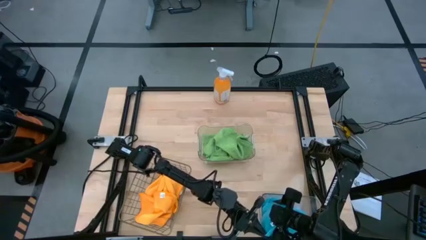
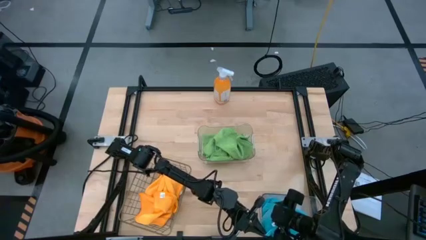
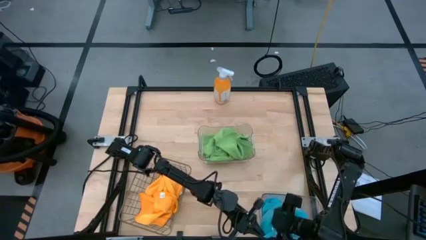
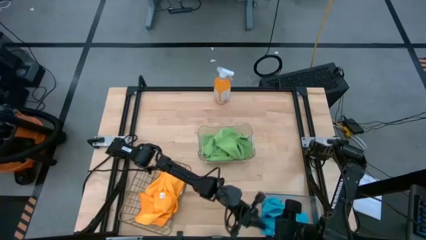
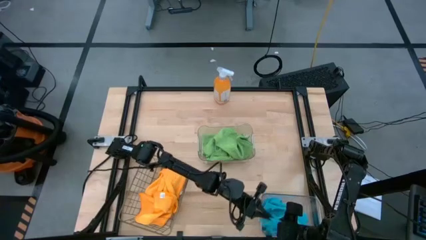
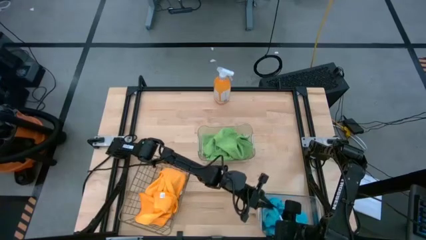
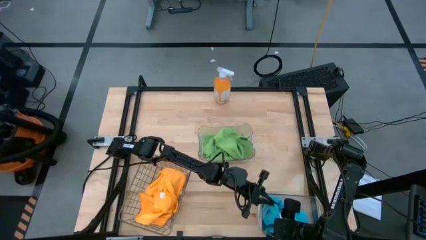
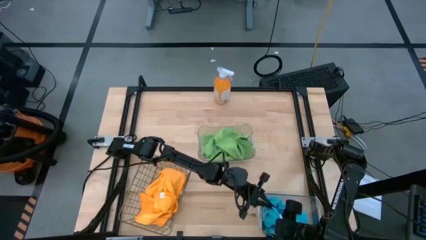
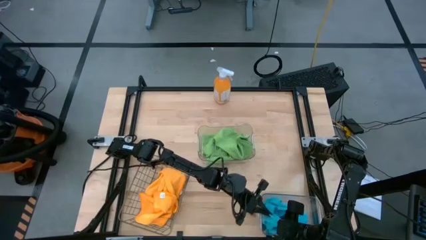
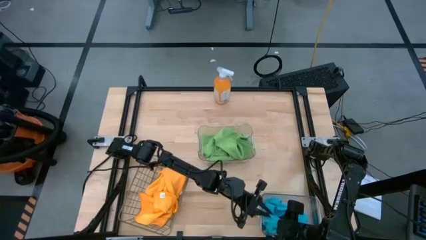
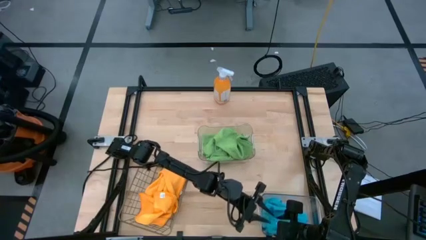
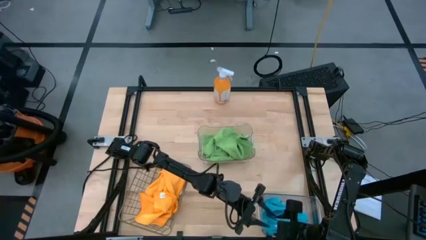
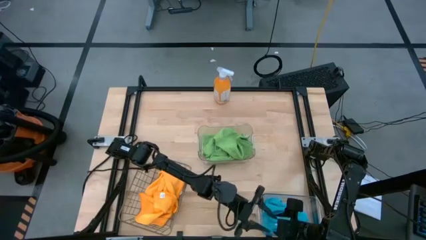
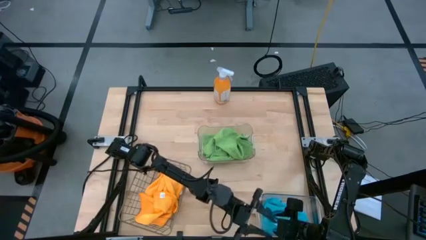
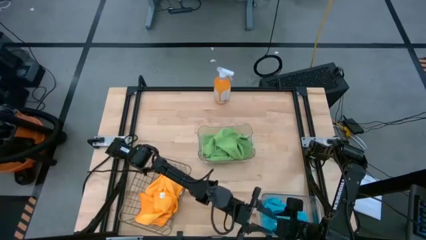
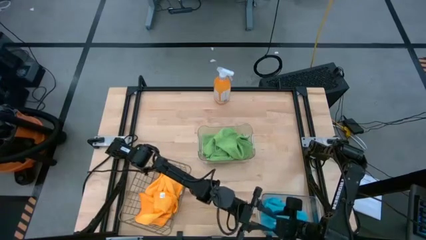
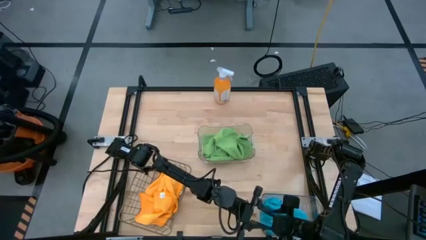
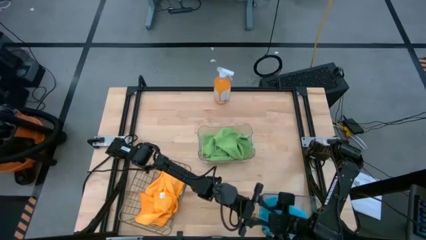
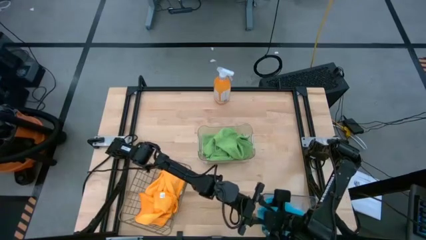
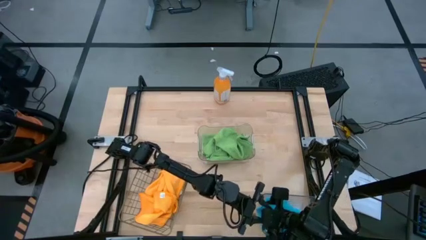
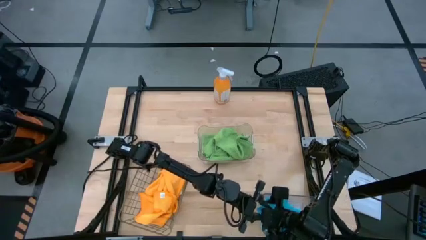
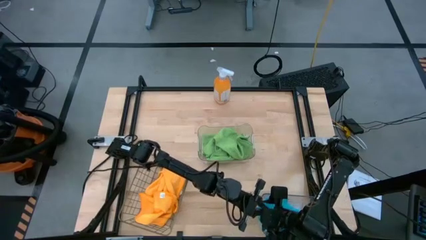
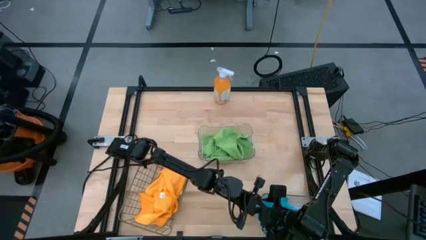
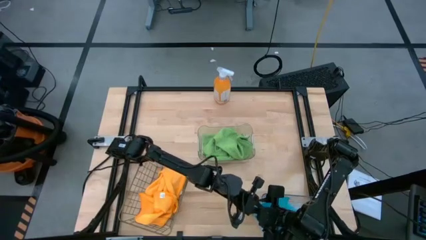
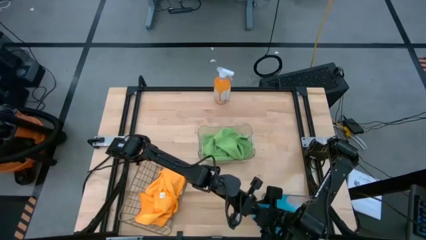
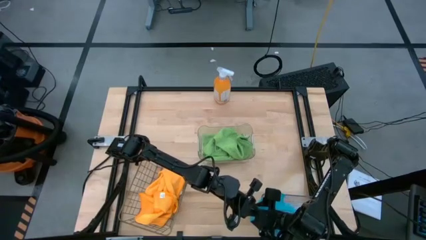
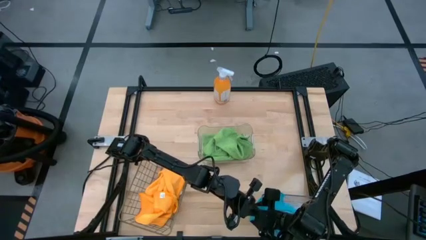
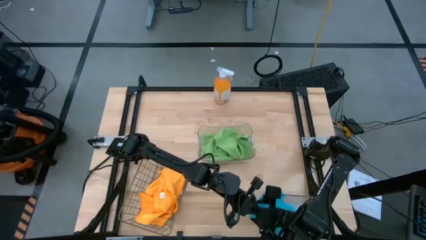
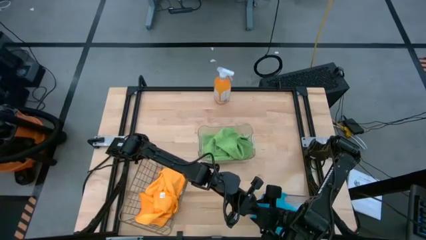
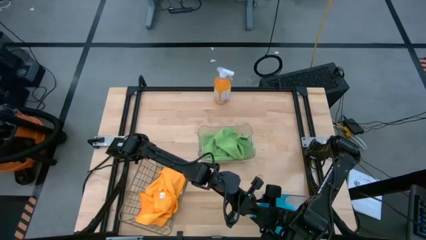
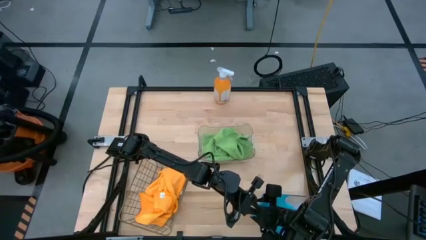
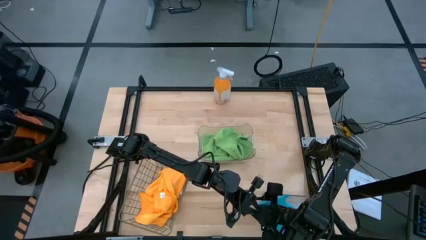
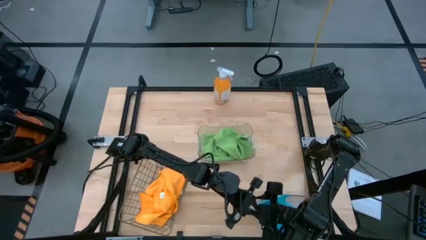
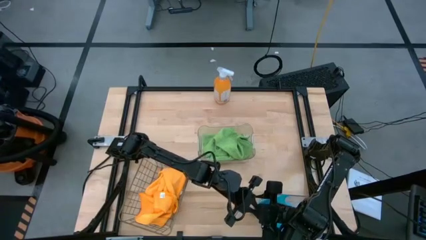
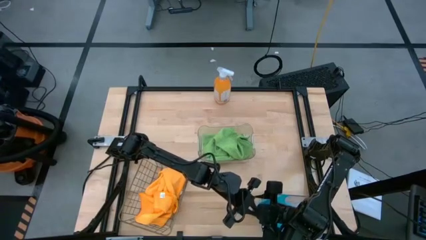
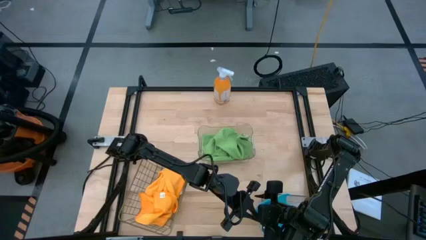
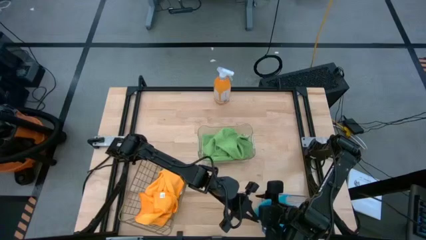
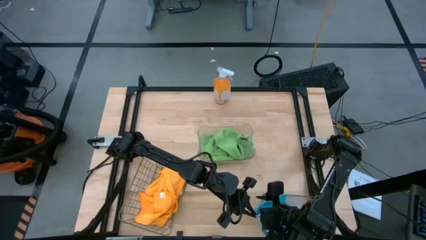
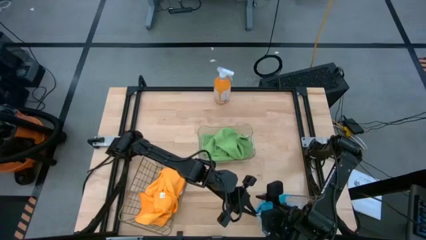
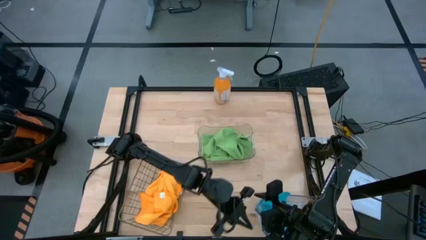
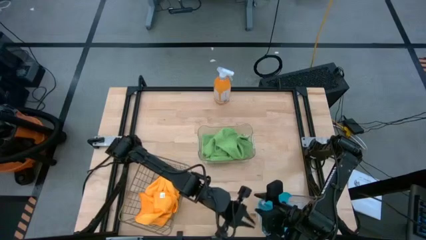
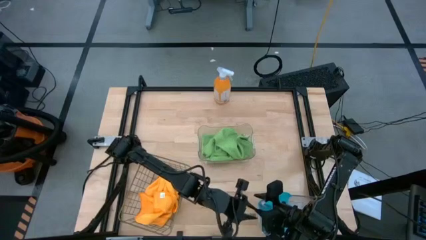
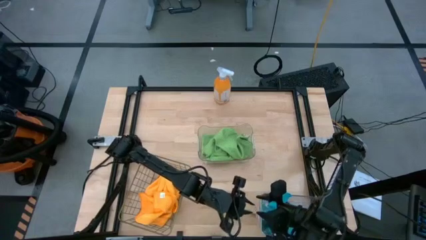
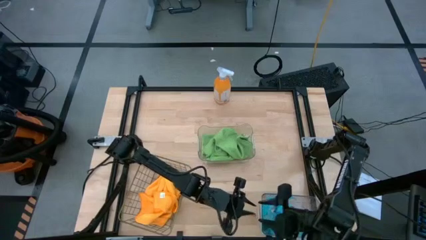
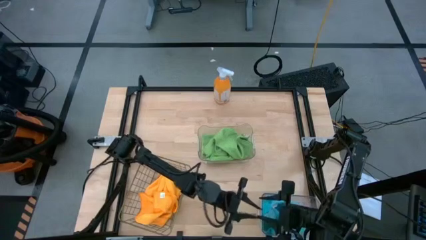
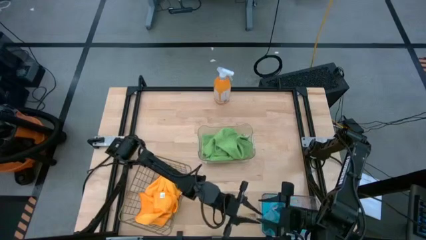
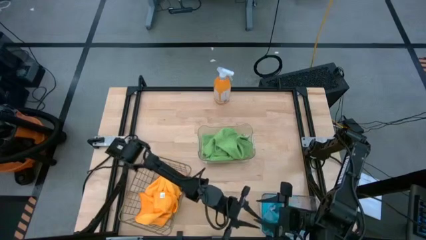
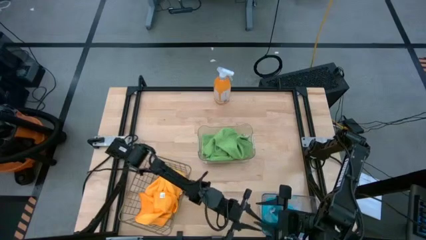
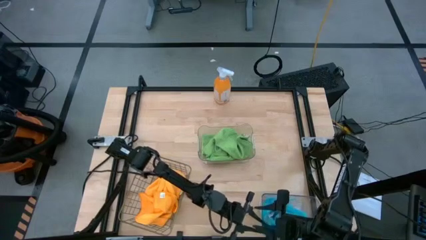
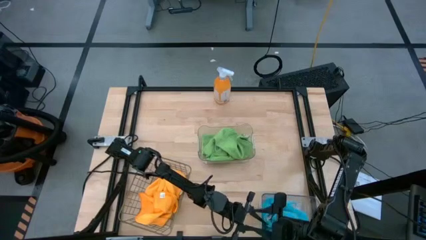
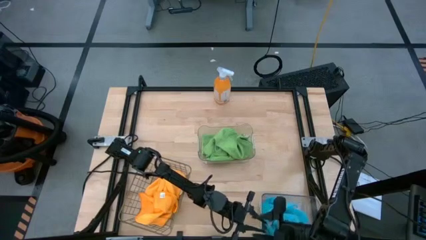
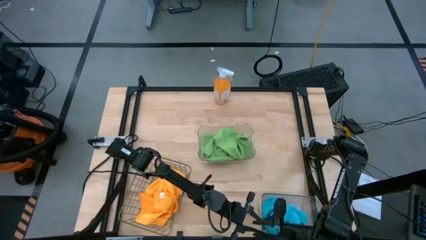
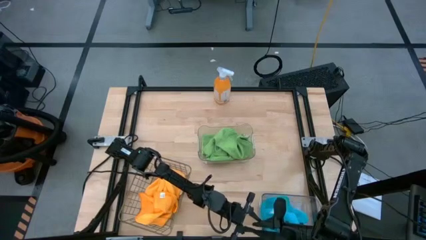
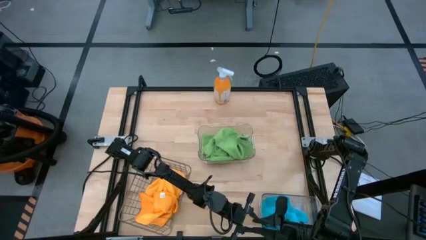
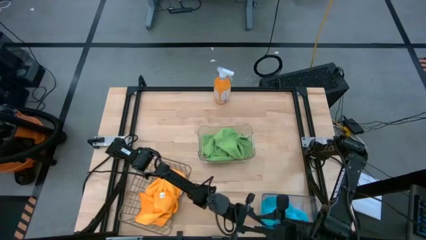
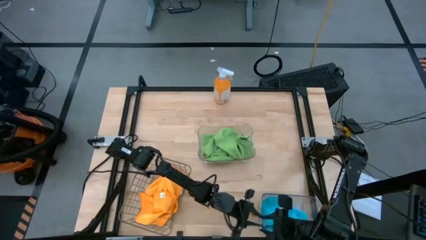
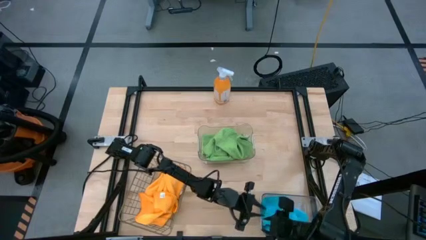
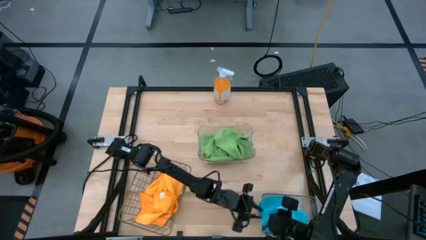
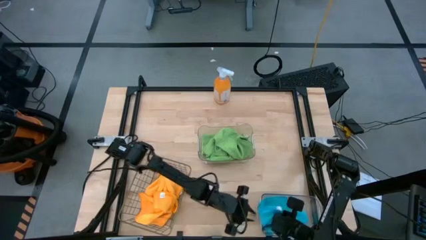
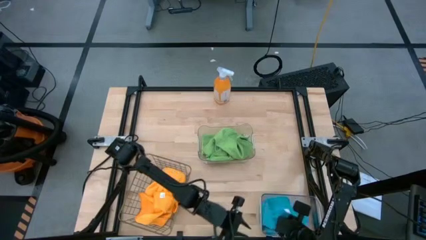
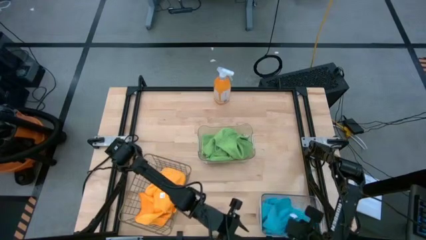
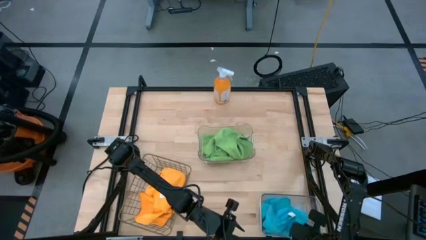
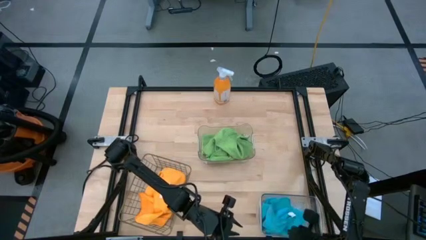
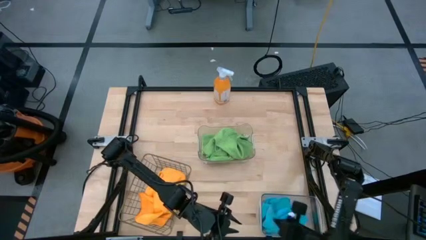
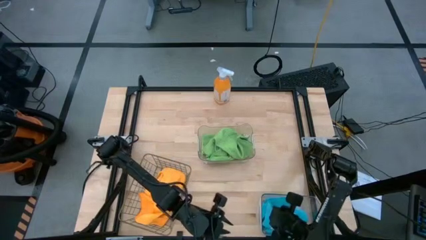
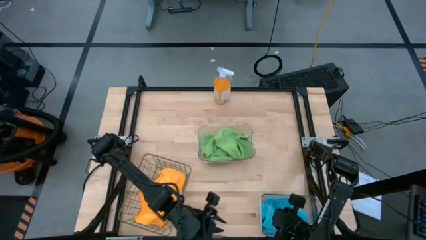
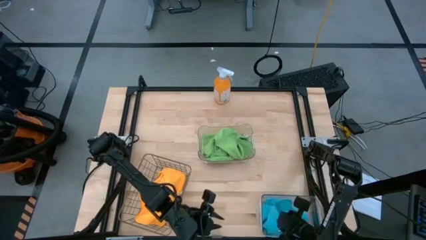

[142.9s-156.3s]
Task: Sort microfiber towel by color & place in baskets
Put the blue towel into the bottom transparent bin

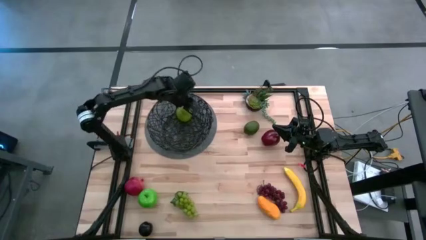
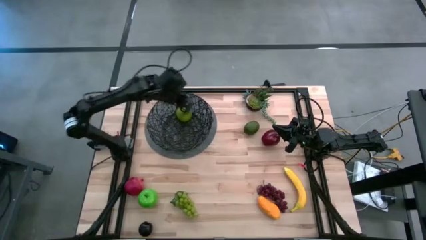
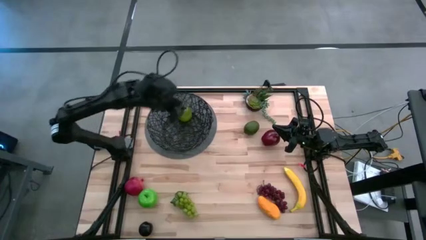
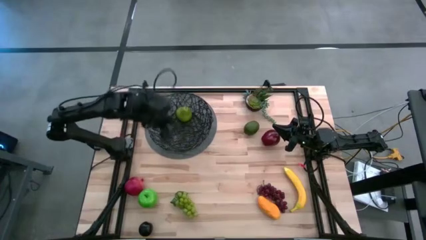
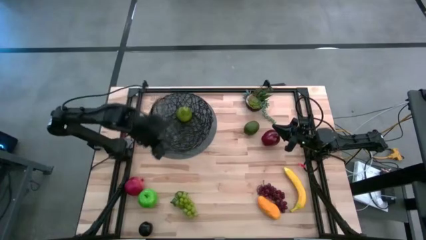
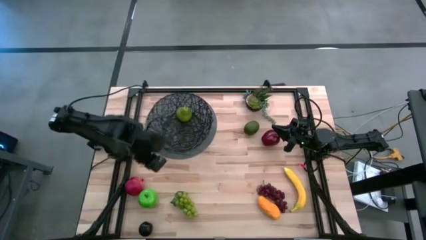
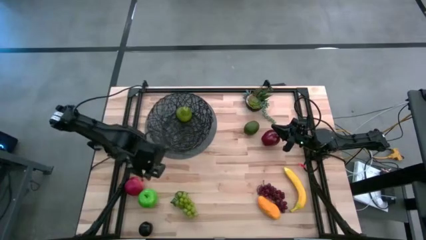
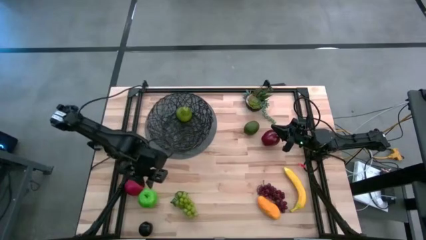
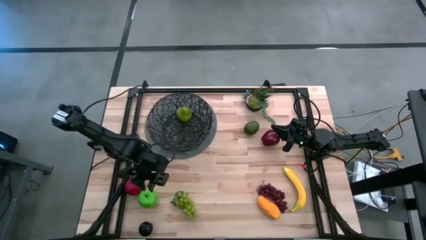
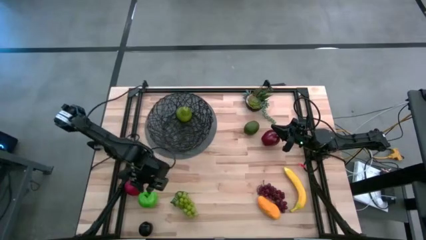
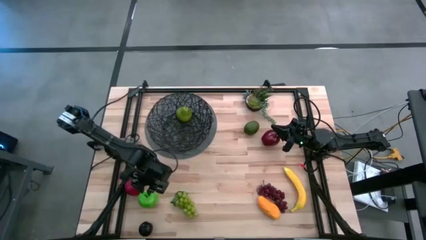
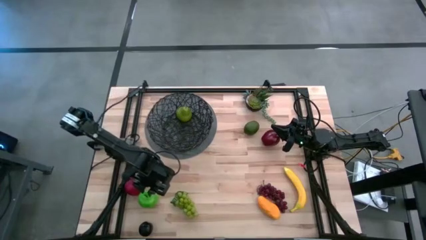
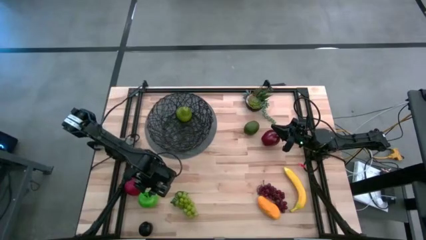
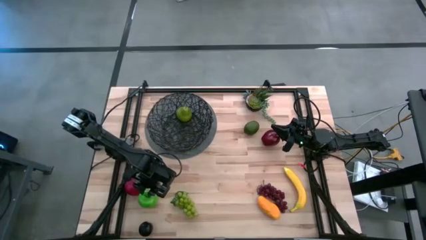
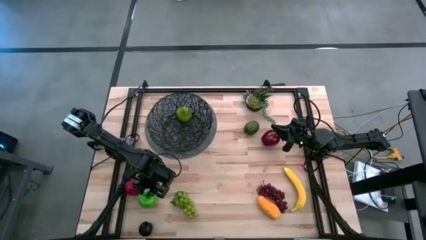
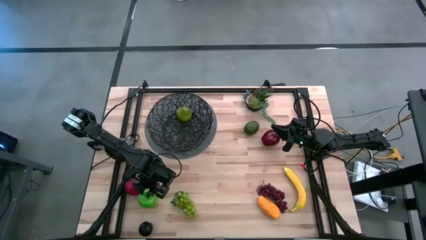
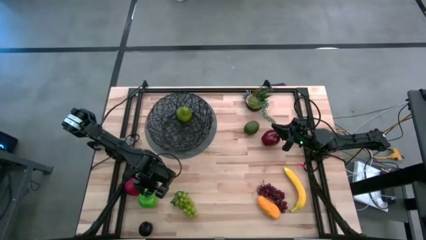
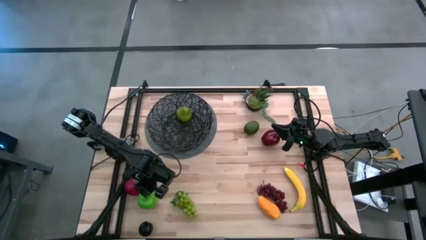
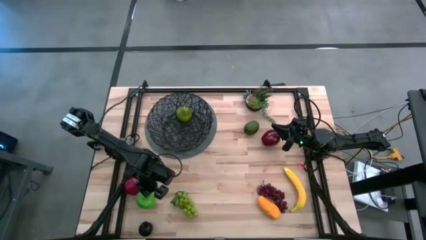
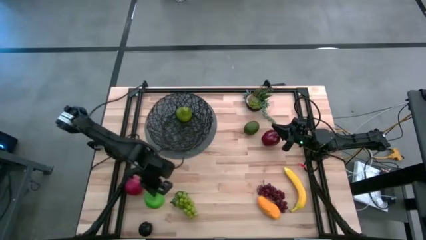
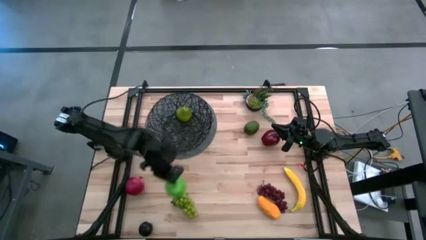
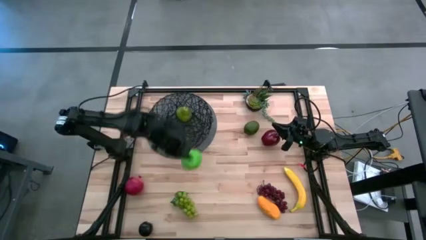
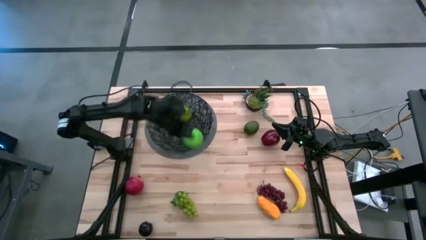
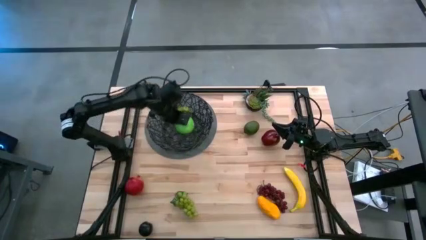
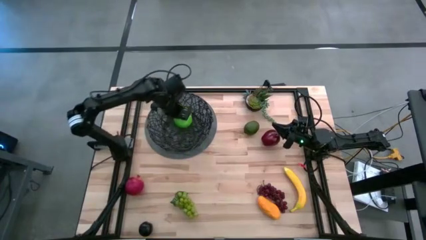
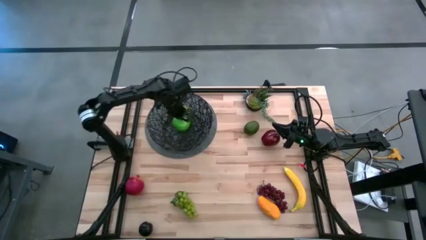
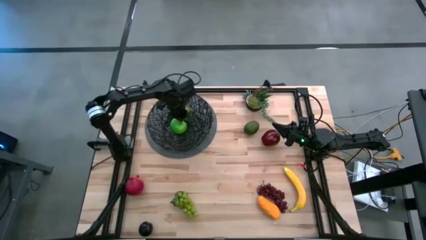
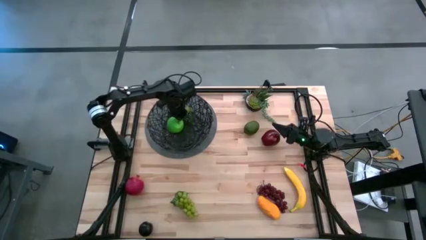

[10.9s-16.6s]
Task: Build produce basket
Put the green apple into the black wire basket
